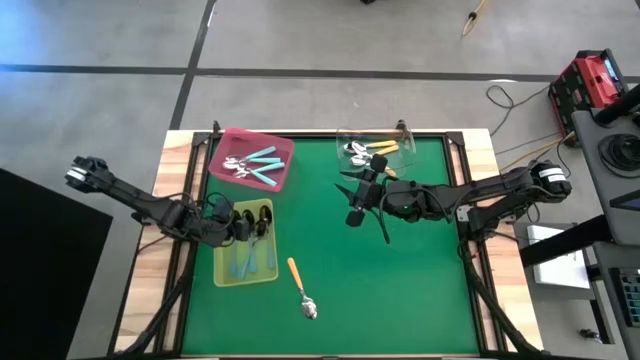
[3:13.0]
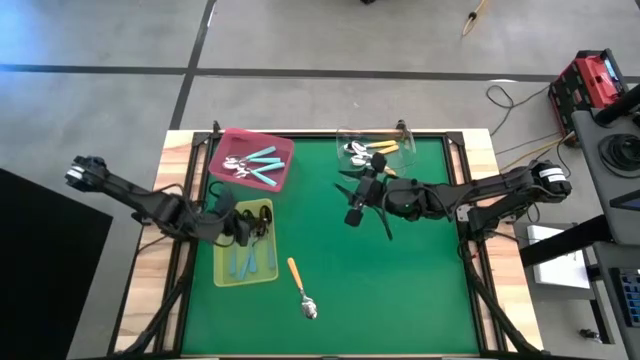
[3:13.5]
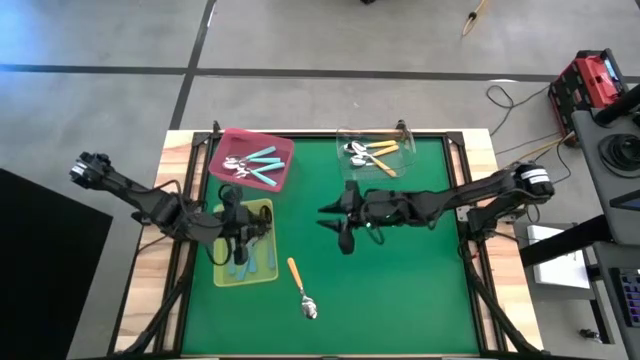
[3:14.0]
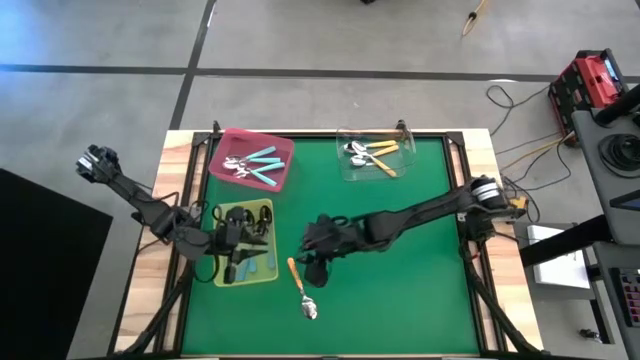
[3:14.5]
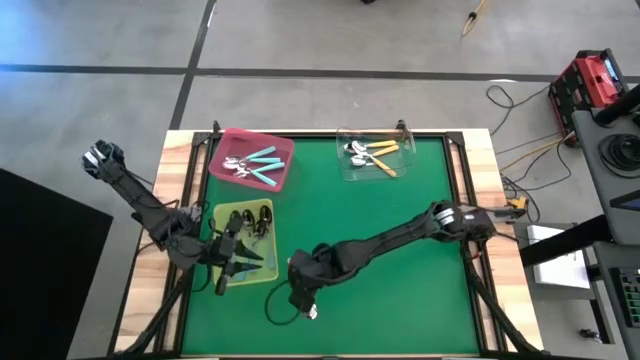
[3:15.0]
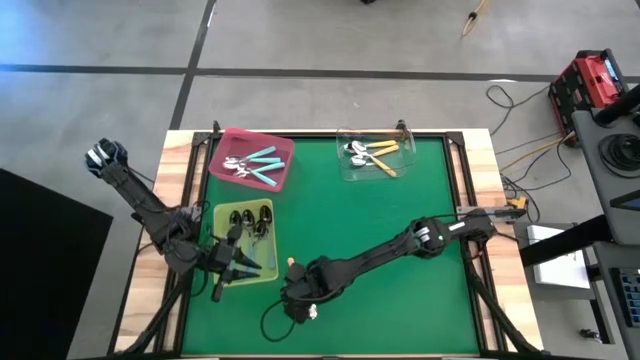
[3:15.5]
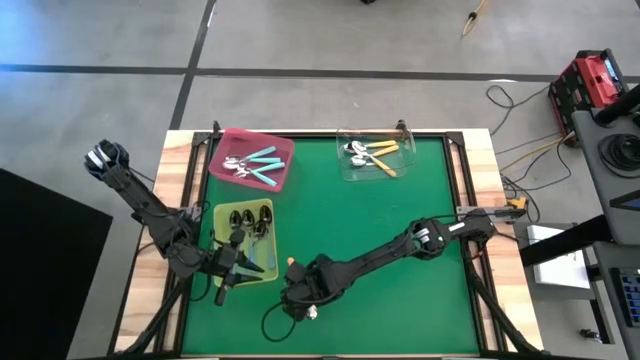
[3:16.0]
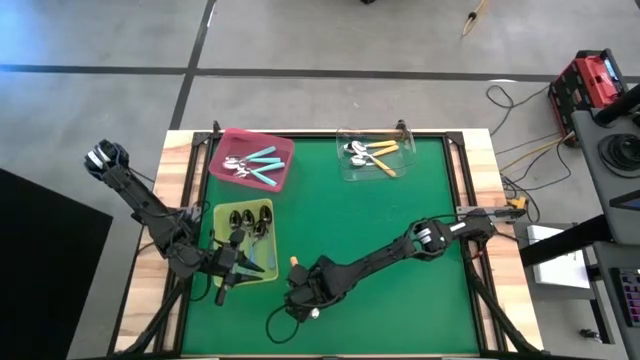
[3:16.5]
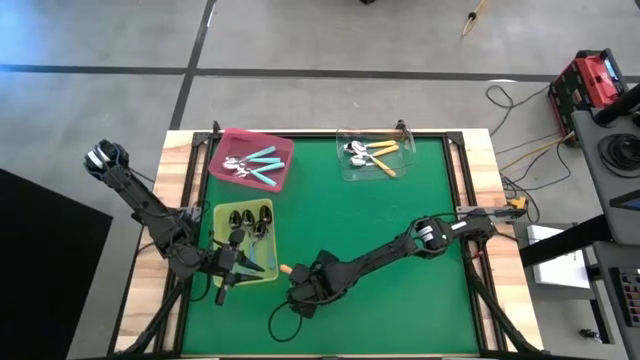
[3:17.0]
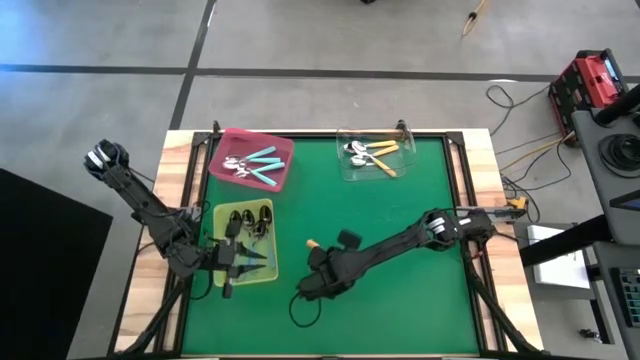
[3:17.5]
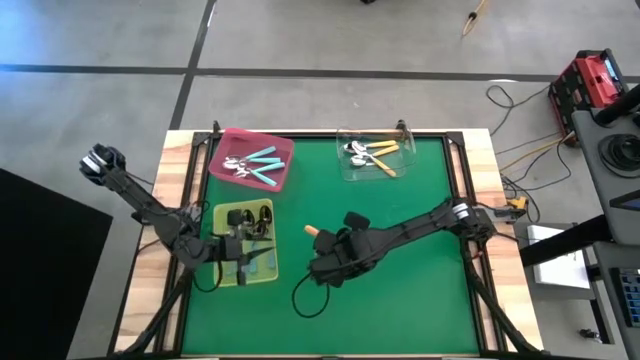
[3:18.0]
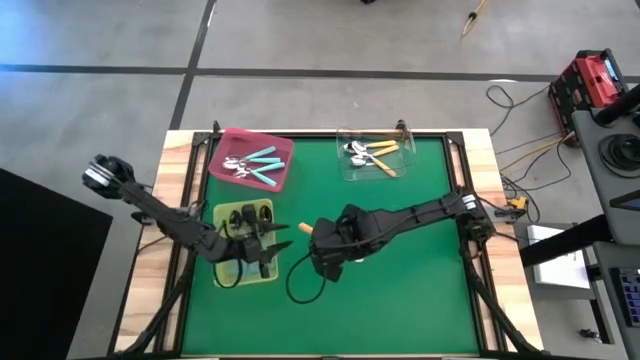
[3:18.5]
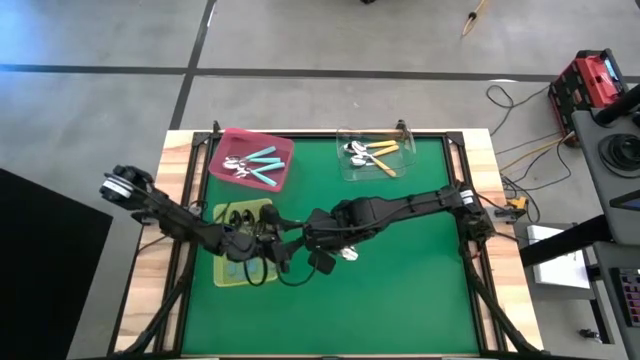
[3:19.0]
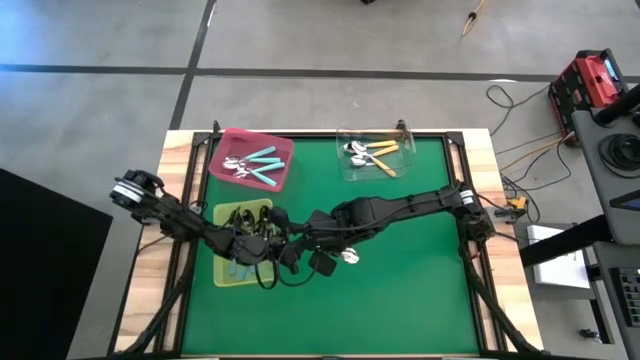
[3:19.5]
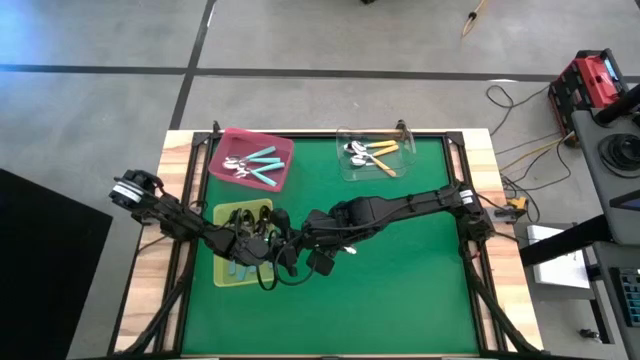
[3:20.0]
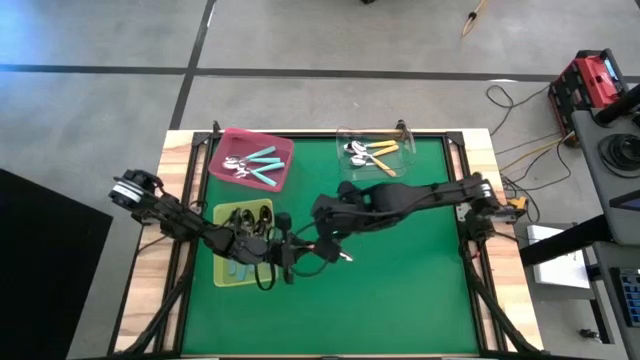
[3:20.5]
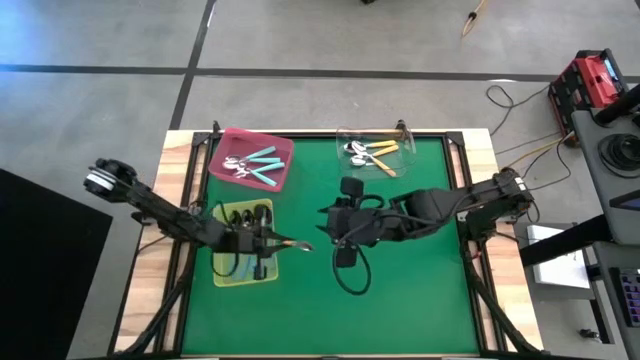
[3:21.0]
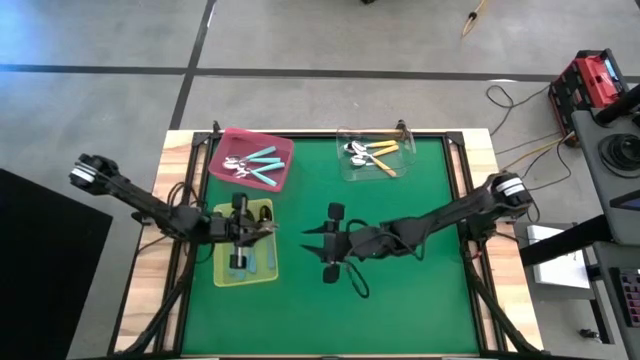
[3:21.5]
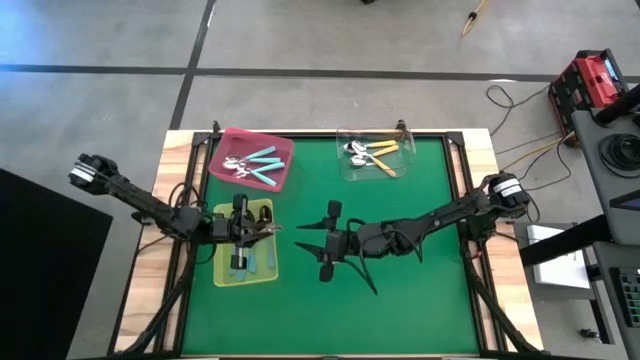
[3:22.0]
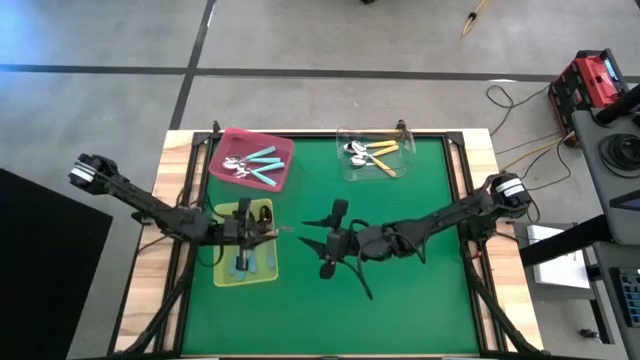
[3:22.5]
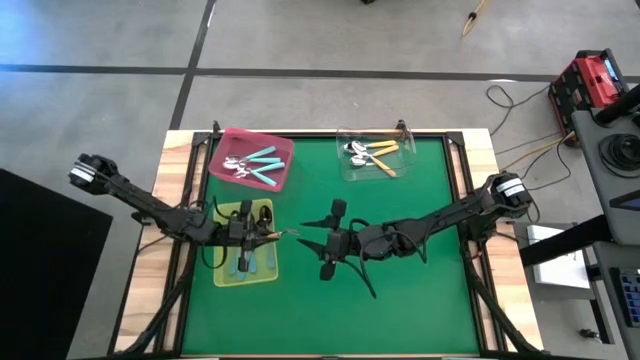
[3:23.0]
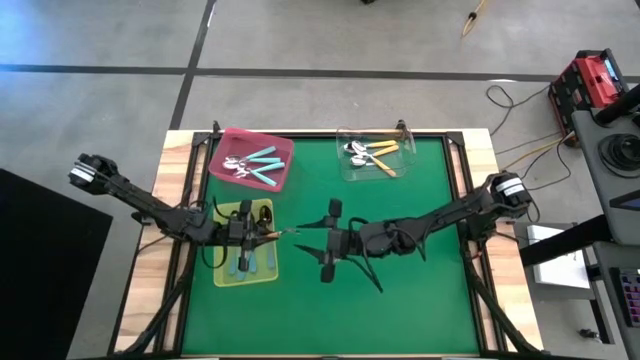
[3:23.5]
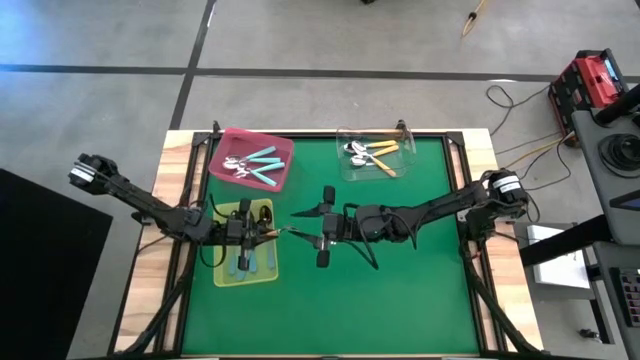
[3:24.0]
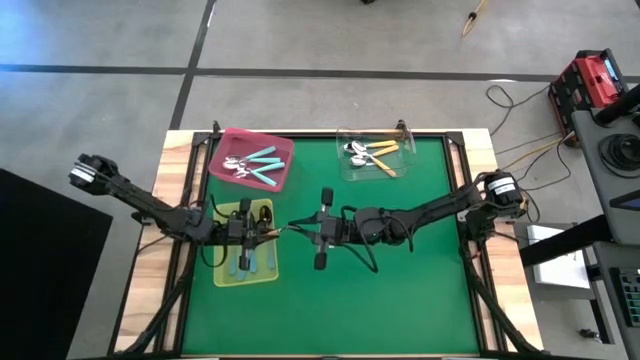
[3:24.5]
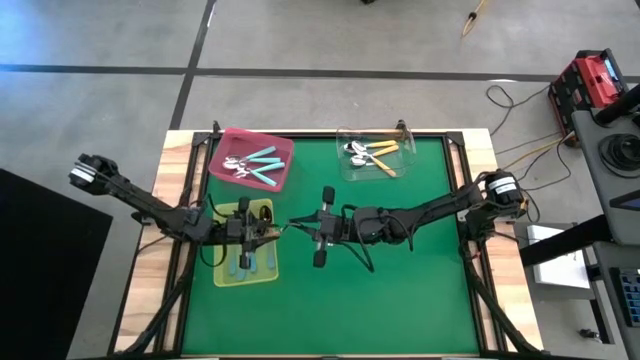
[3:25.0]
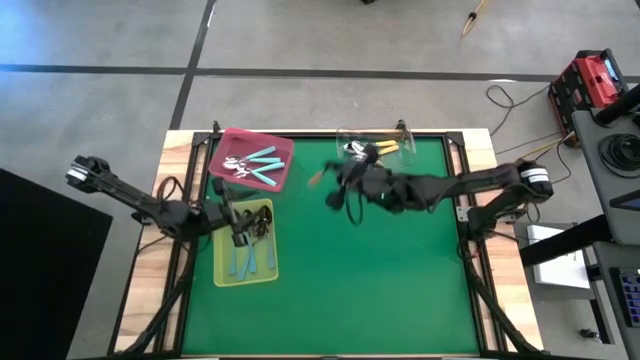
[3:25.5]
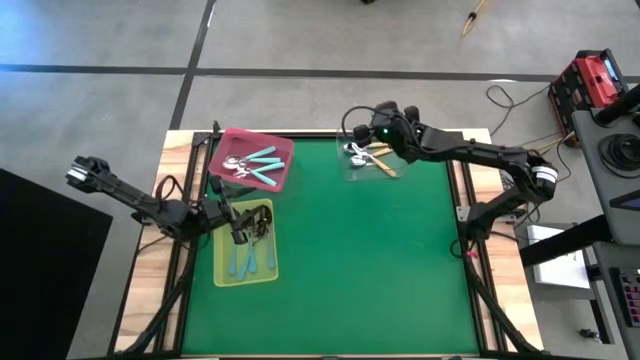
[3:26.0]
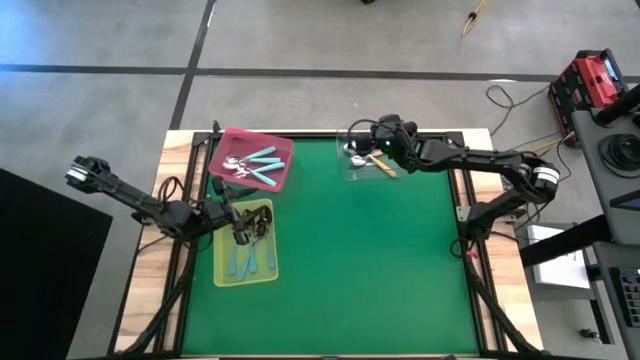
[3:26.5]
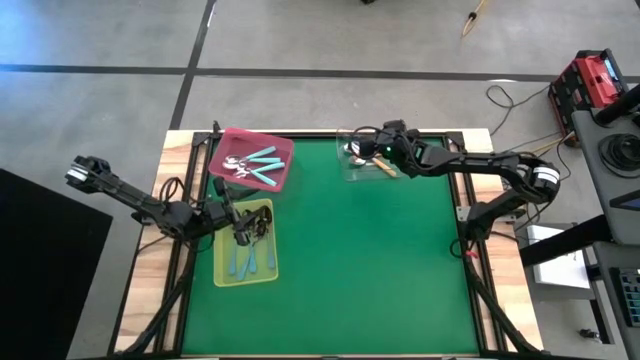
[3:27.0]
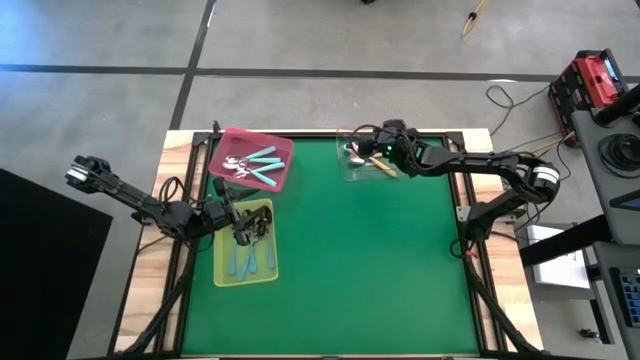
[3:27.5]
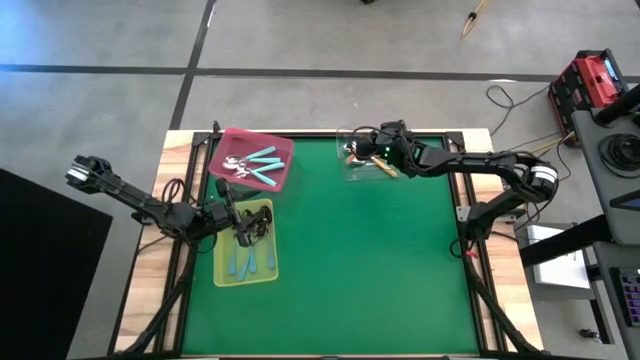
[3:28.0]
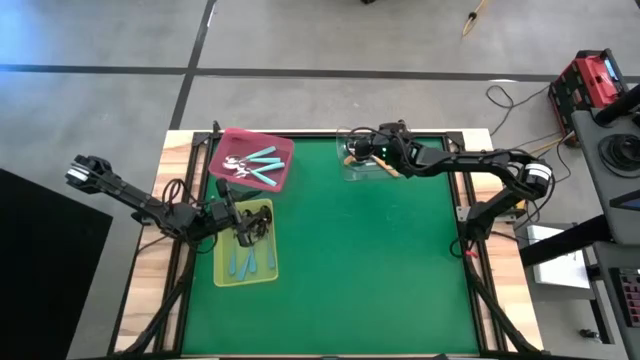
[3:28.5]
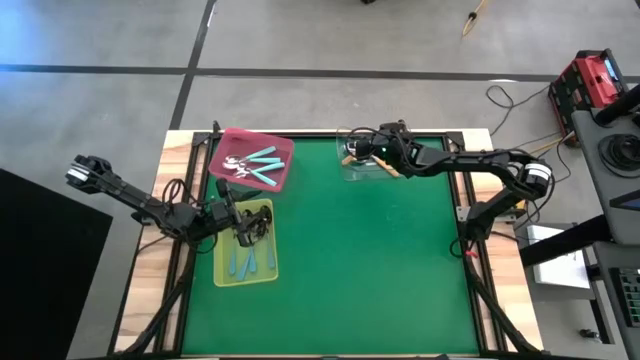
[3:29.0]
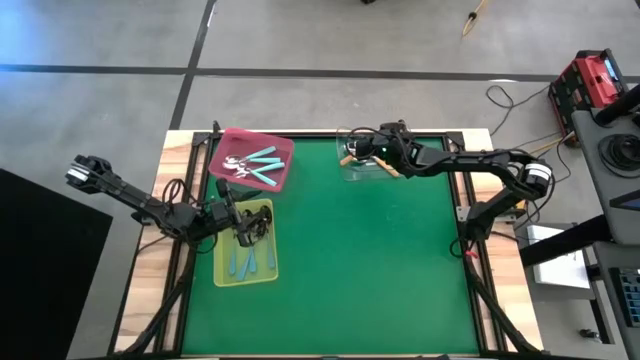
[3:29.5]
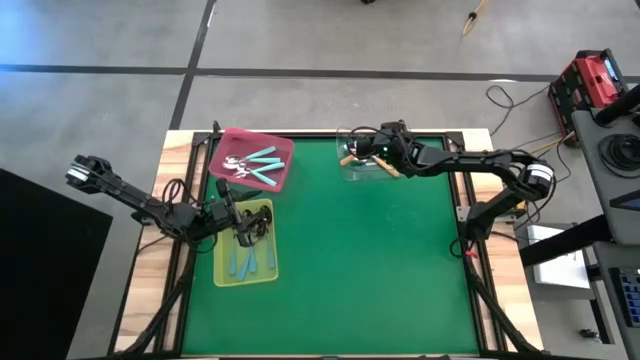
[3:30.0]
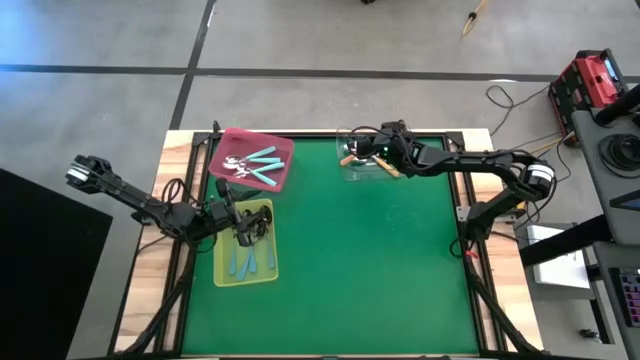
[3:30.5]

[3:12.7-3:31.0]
Task: Sort silverware by color (type)
Put the yellow spoon into the transparent bin

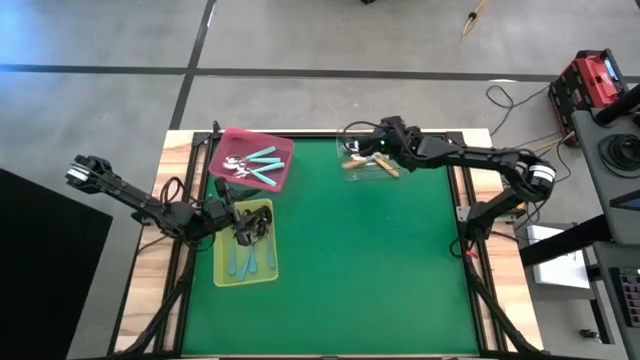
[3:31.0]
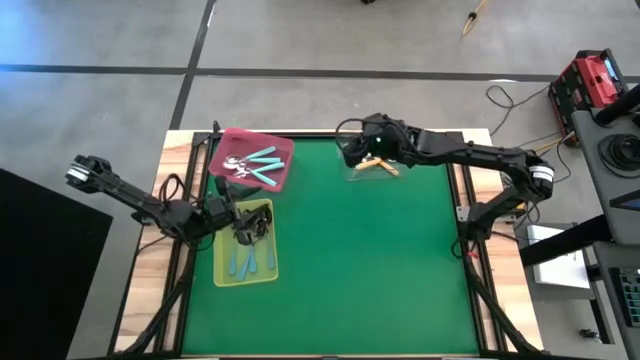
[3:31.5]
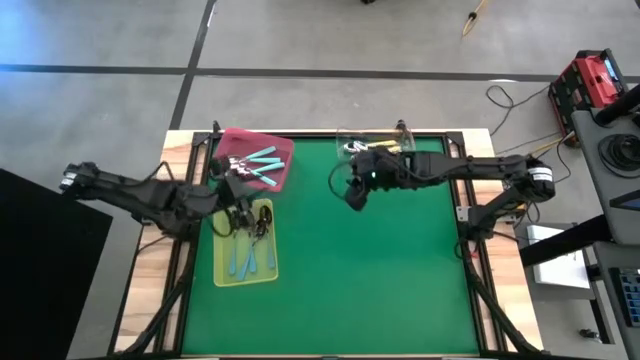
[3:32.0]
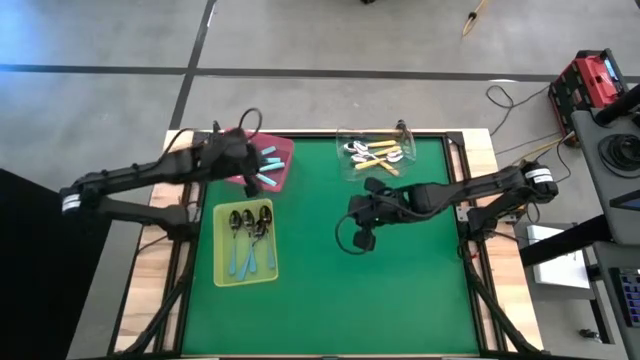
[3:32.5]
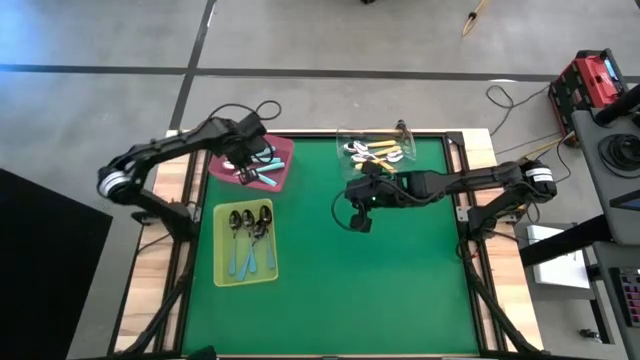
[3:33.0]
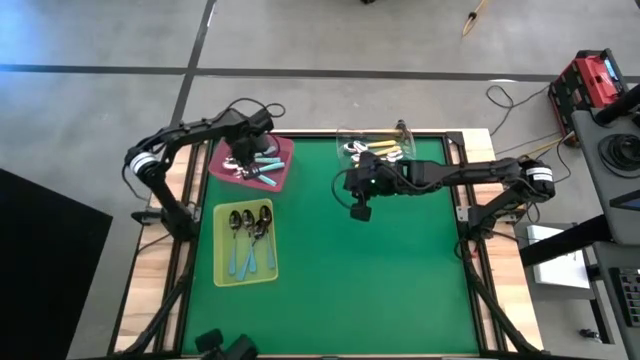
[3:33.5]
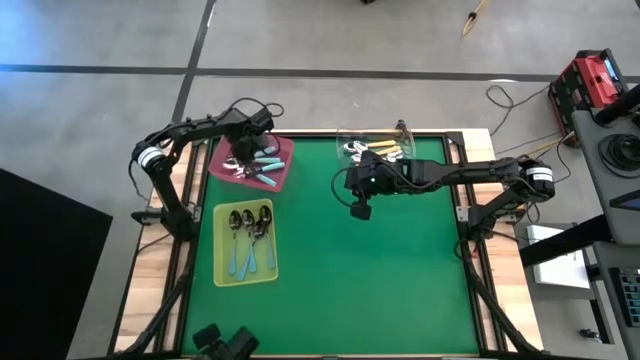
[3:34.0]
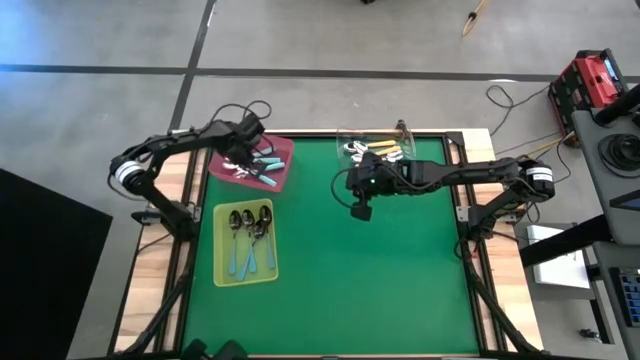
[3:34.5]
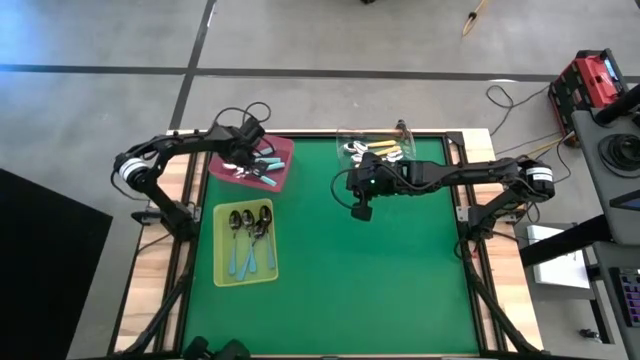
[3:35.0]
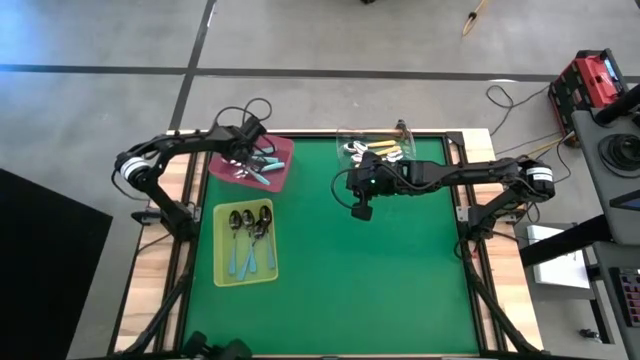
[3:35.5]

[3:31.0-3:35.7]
Adjust the light blue spoon in the red bin
